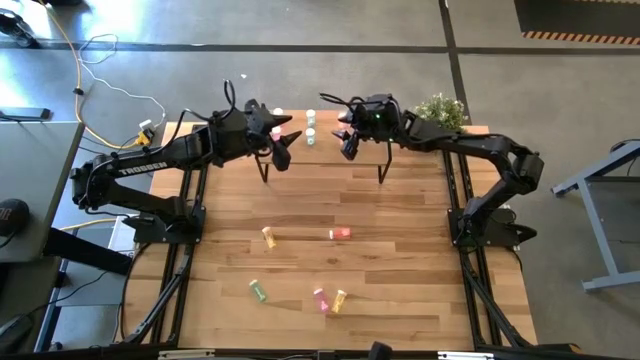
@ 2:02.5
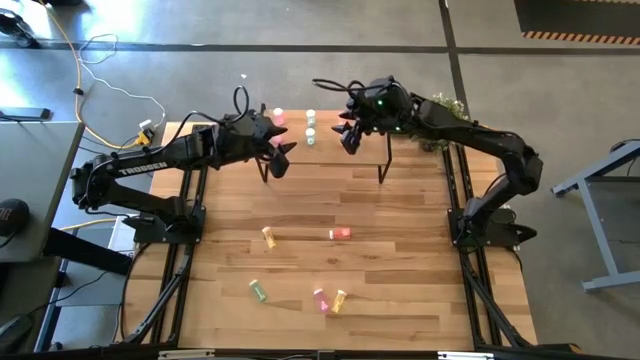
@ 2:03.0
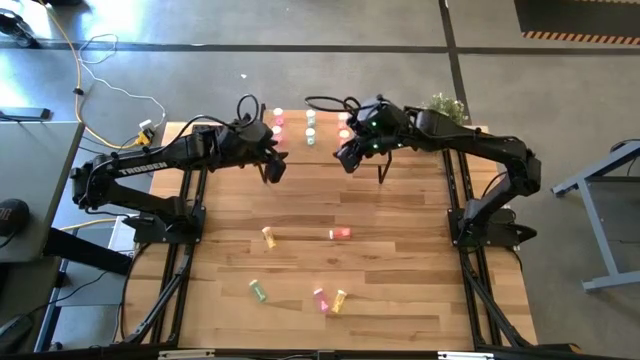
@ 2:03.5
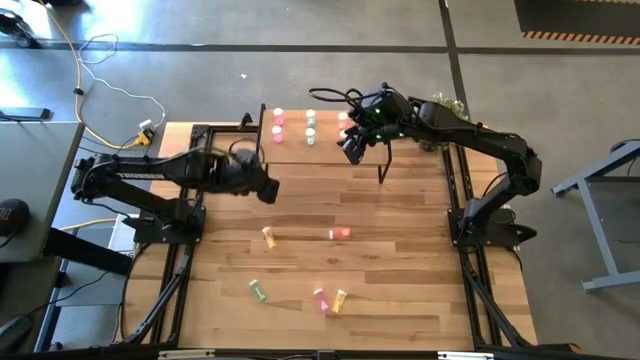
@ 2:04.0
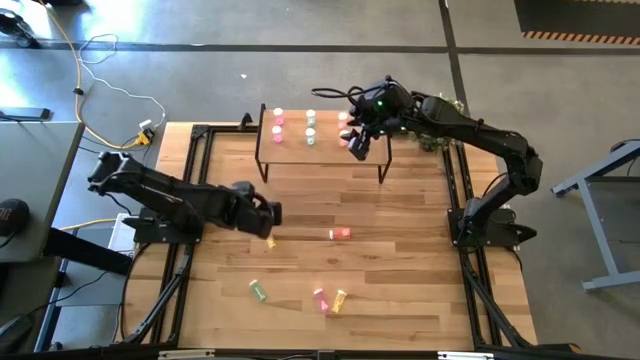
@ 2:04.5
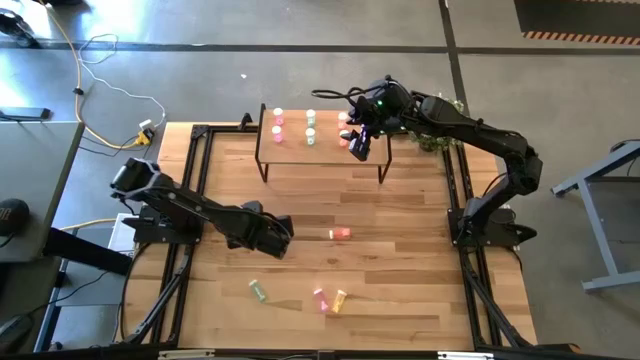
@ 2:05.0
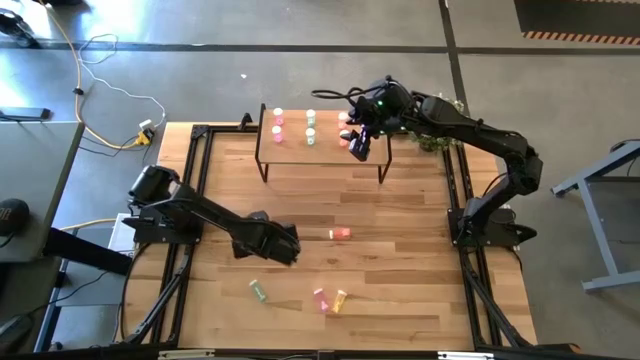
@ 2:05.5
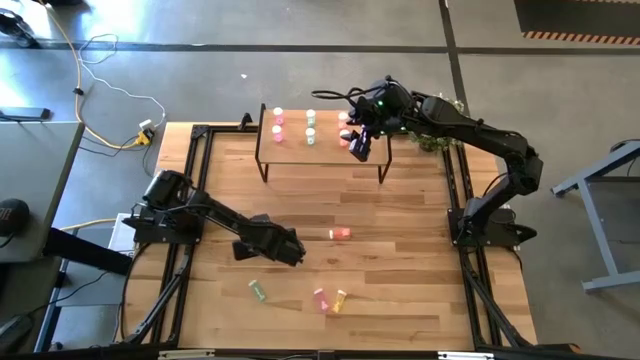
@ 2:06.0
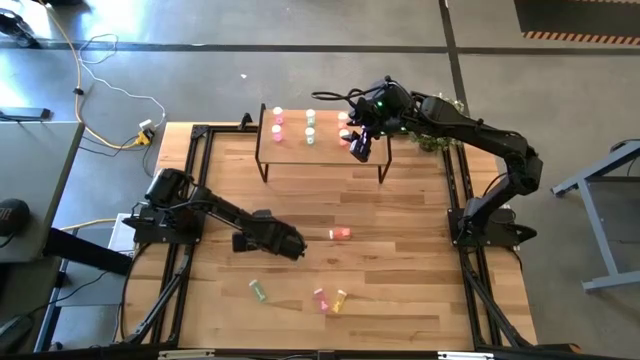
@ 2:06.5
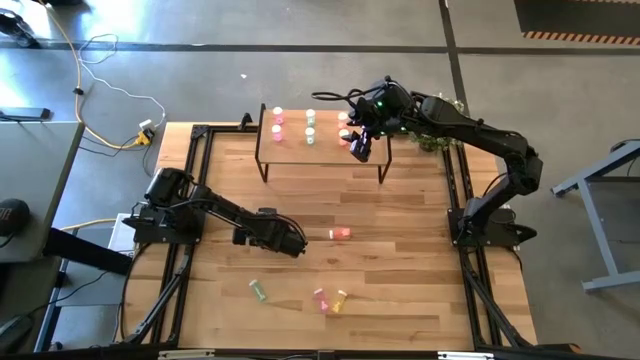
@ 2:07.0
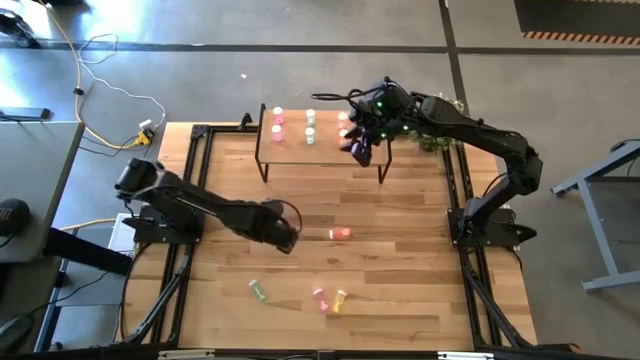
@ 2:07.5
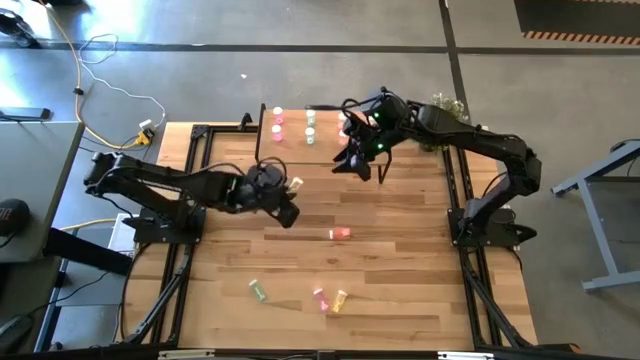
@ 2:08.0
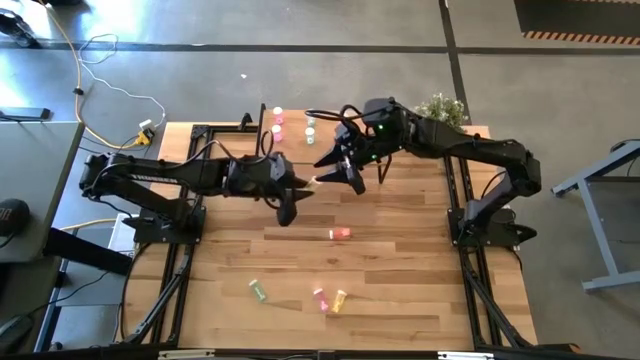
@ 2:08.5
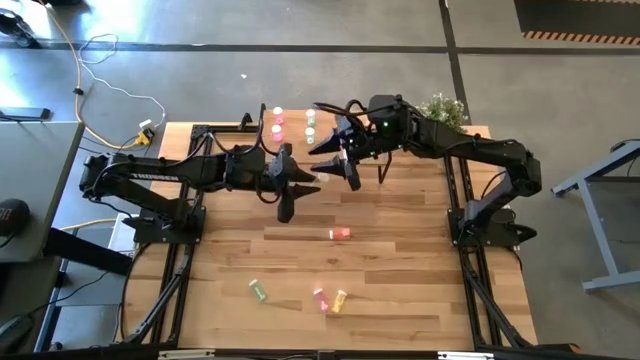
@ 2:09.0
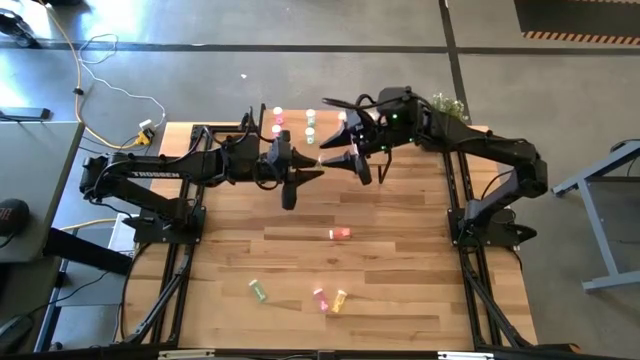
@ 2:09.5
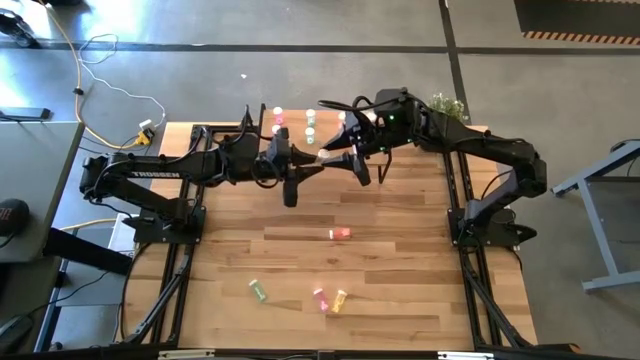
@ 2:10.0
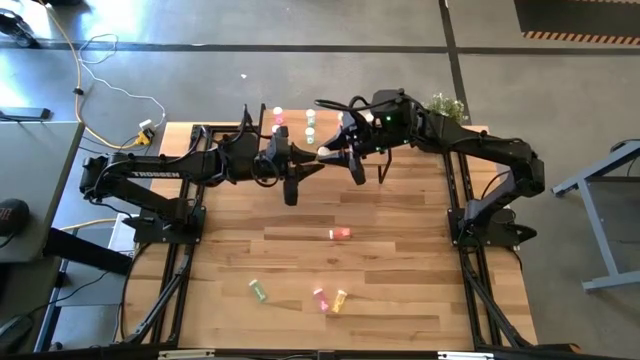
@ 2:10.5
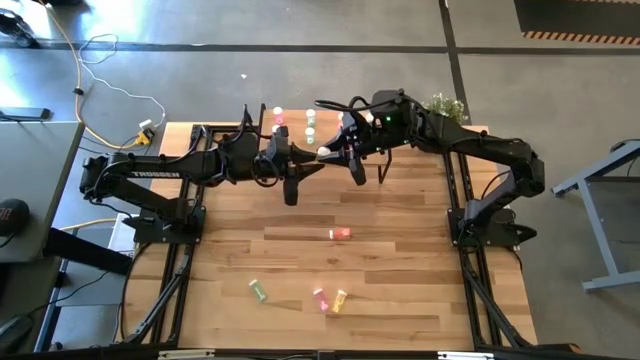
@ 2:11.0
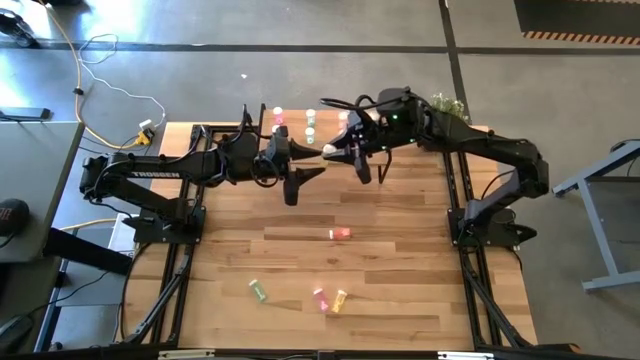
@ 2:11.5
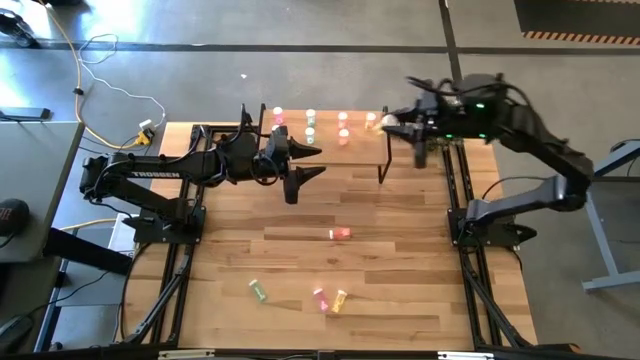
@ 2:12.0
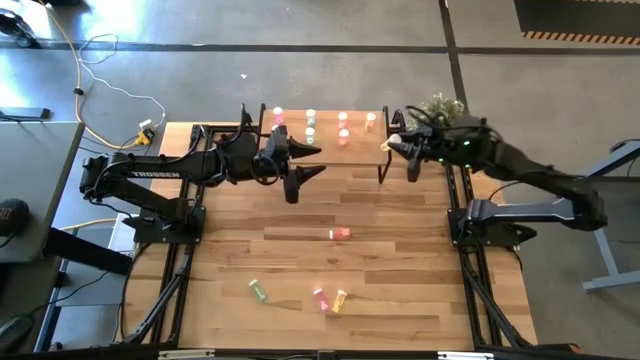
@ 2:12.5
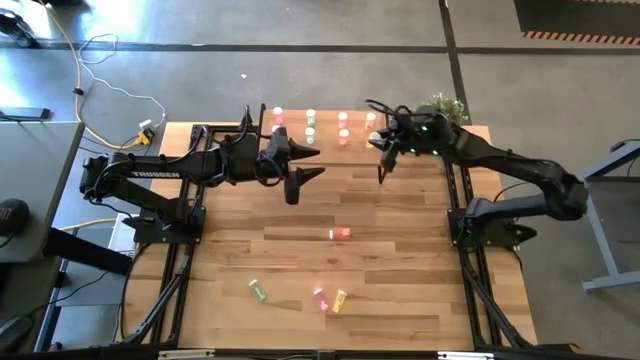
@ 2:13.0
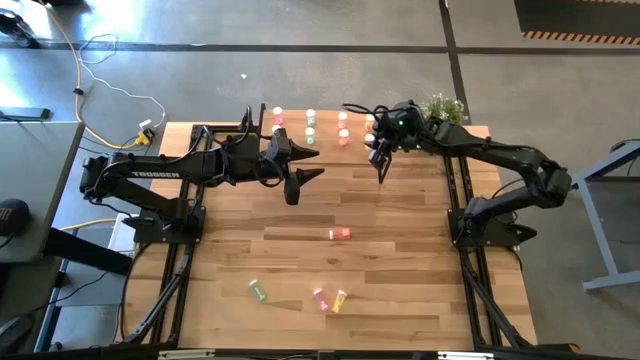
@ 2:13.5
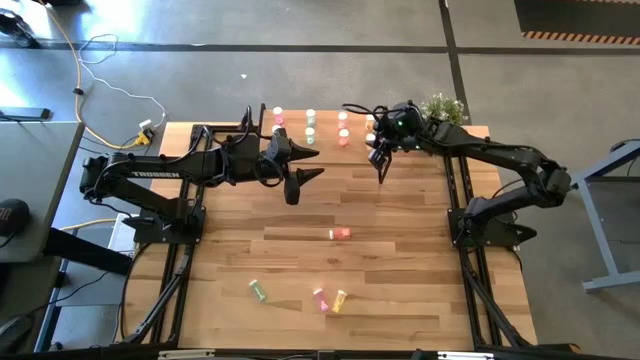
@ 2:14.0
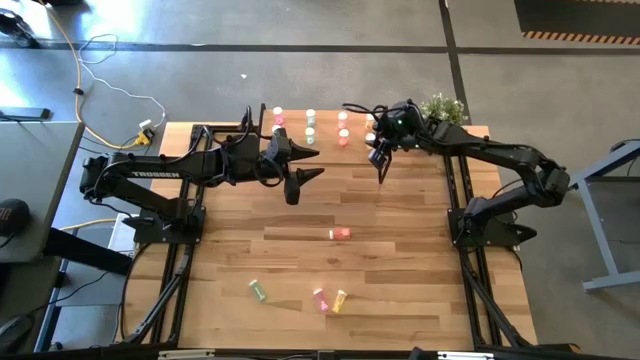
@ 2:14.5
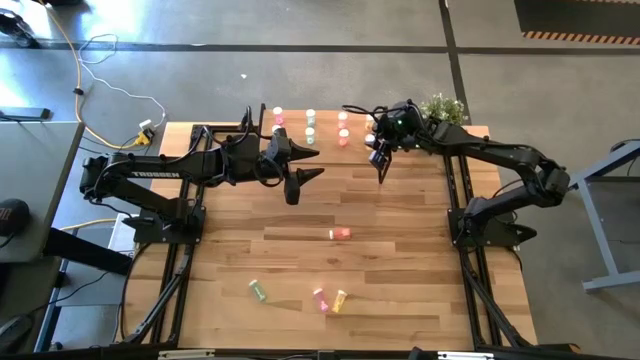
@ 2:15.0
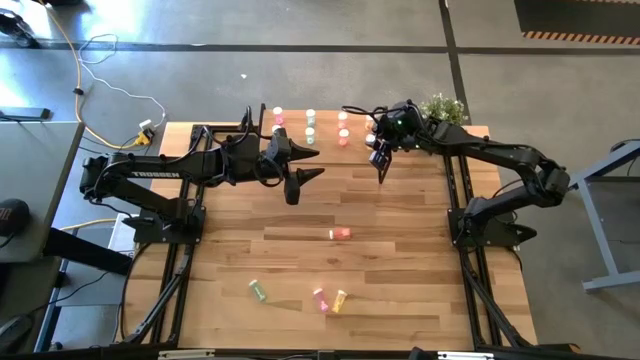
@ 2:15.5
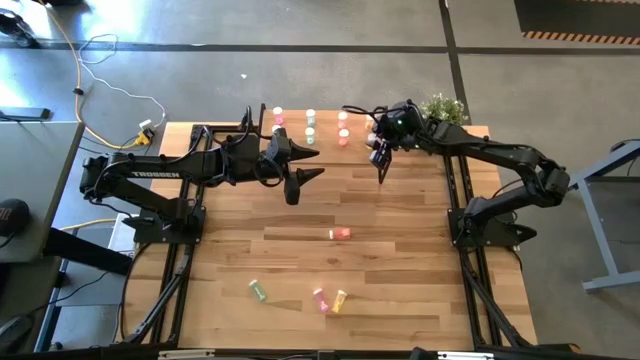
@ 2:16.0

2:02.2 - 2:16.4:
Task: Pick and place medicine bottles onto shelf by color
Put the top yellow pill bottle on the shelf aligned with the other yellow pill bottle

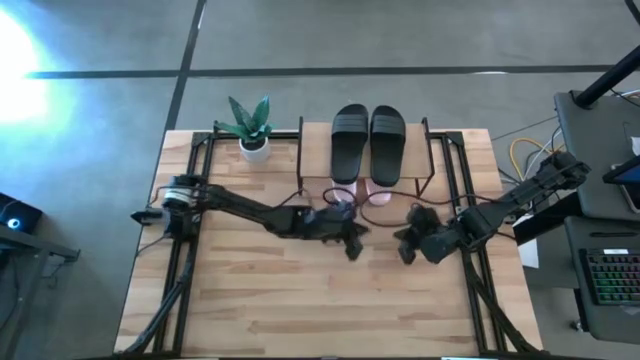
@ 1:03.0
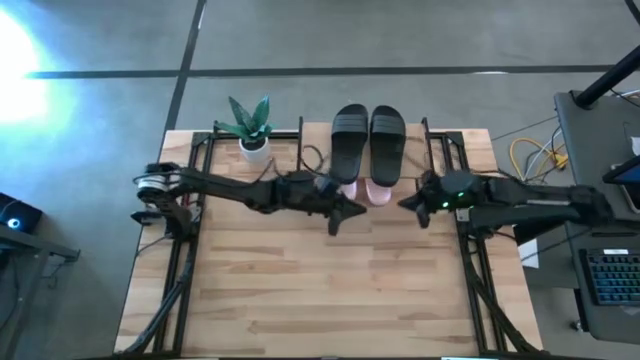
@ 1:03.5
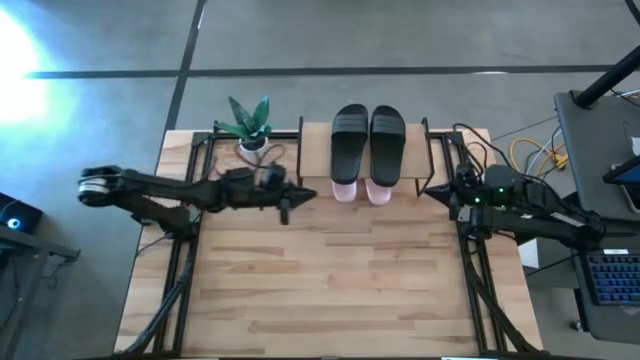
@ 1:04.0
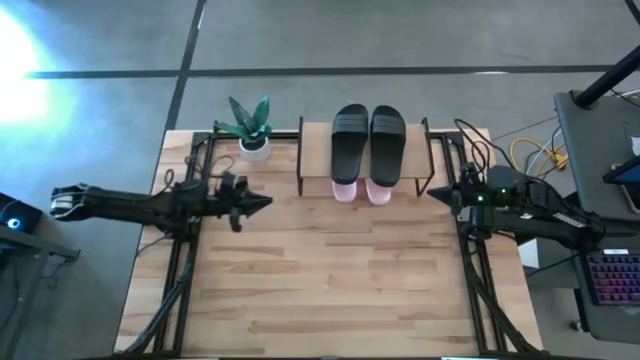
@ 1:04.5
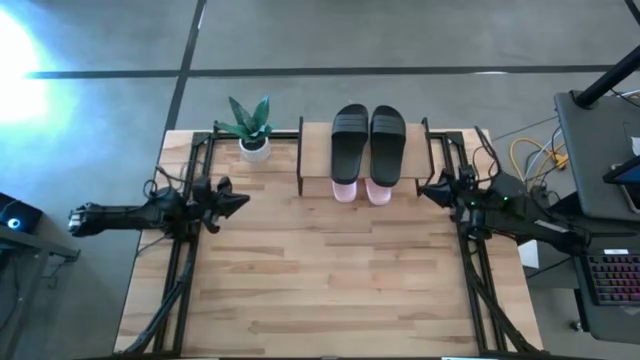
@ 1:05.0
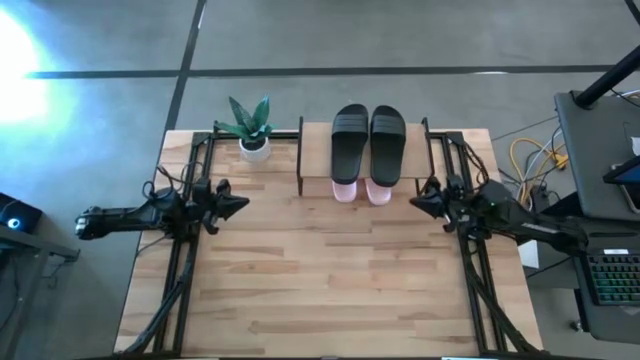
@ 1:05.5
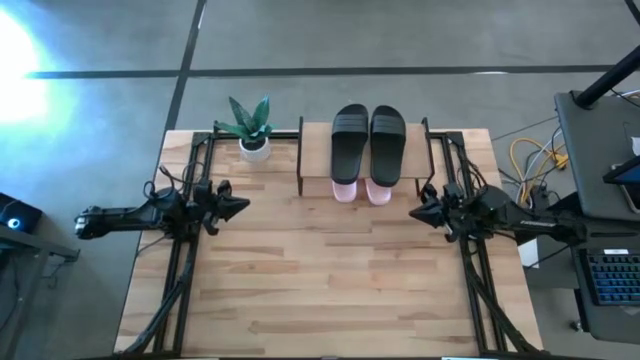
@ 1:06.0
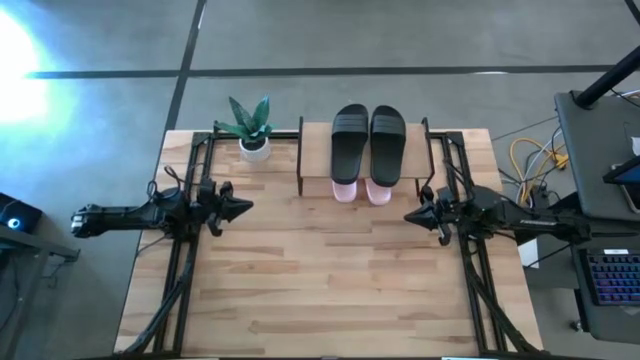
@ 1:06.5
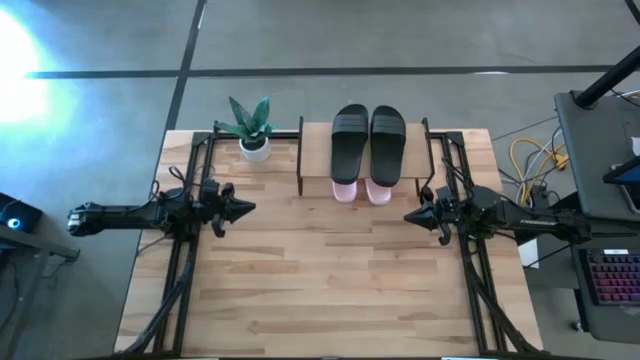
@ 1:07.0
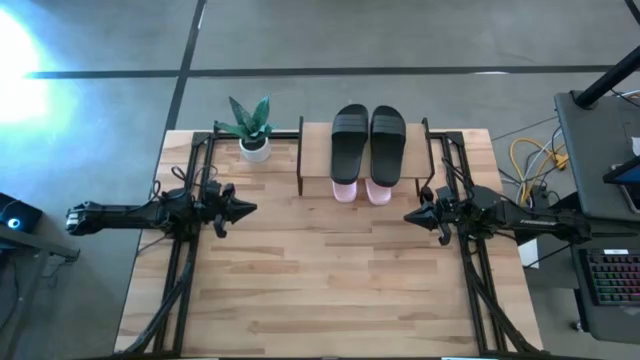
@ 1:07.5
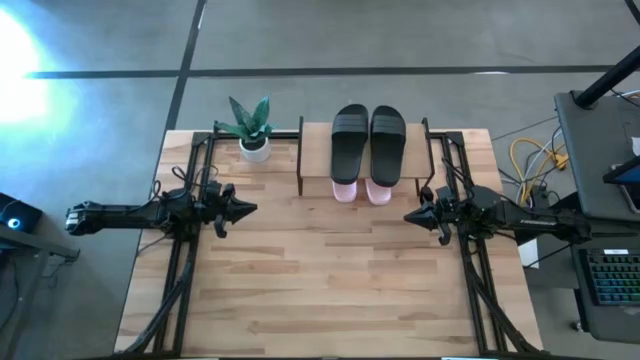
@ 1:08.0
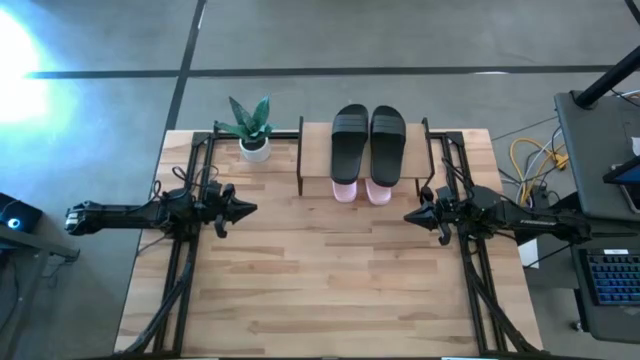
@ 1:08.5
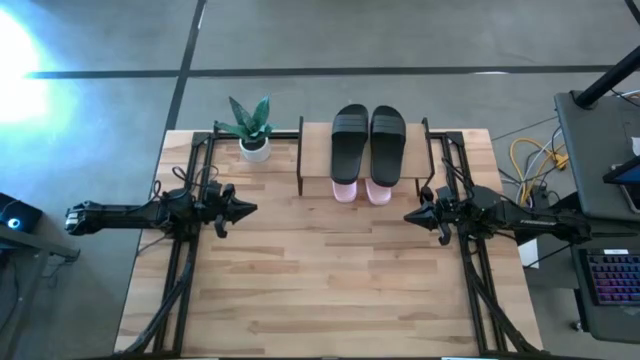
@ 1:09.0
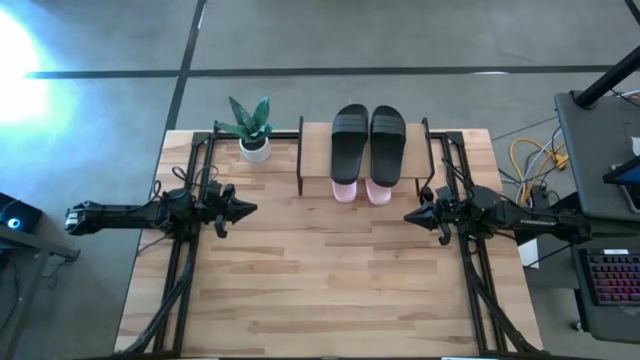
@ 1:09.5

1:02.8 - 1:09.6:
Task: Pick and place slides into the shelf
Return to Home Position
